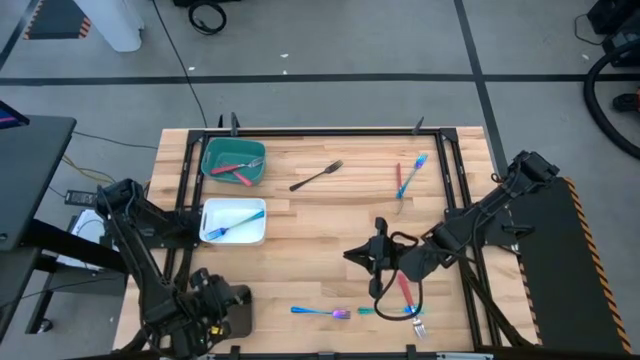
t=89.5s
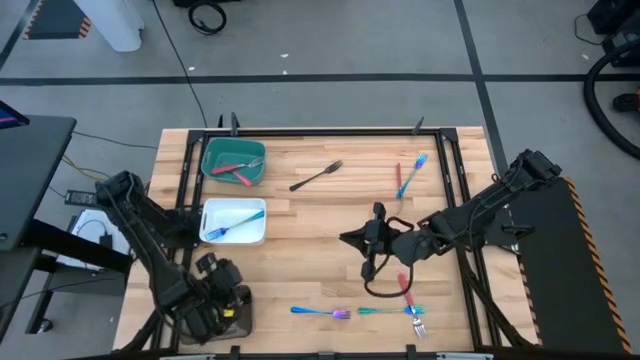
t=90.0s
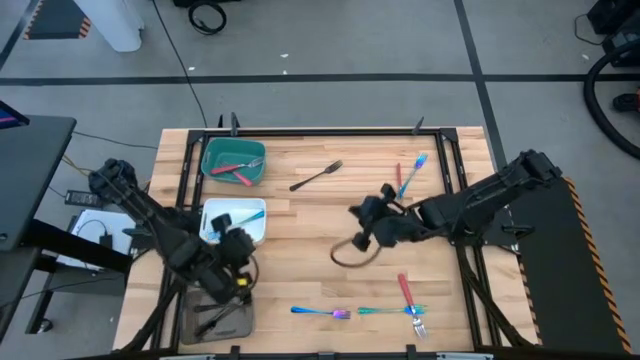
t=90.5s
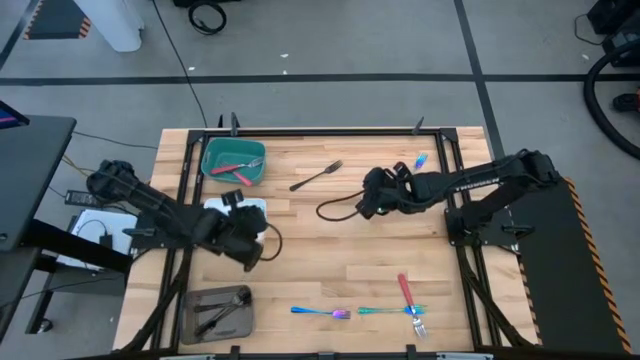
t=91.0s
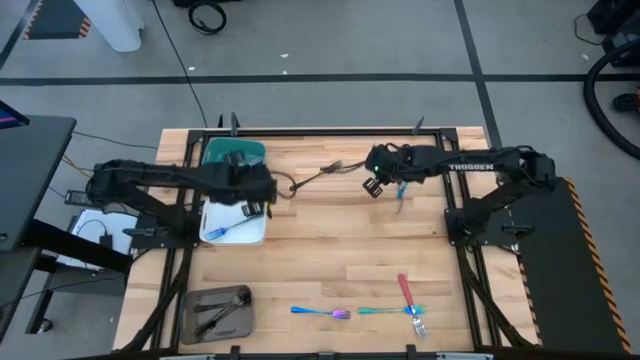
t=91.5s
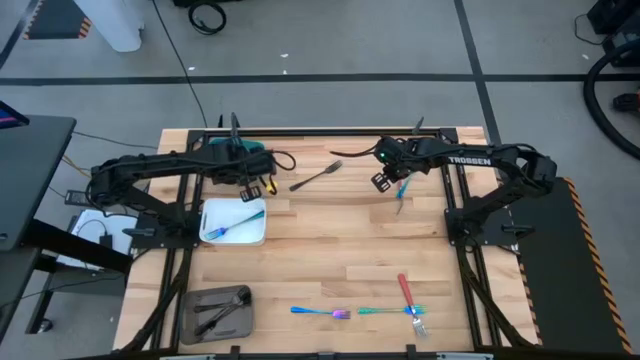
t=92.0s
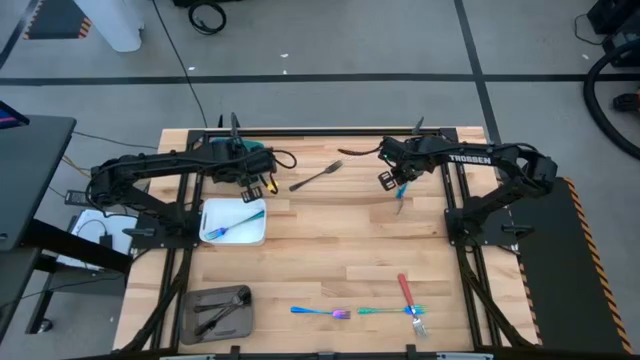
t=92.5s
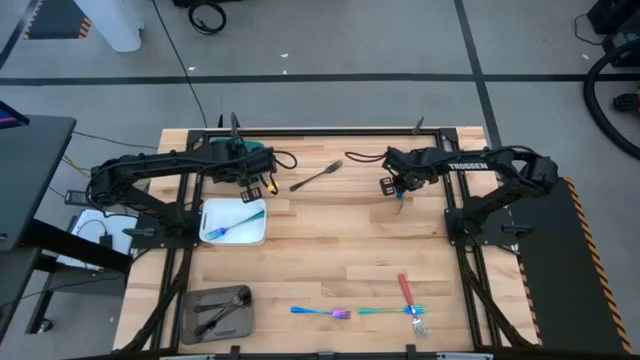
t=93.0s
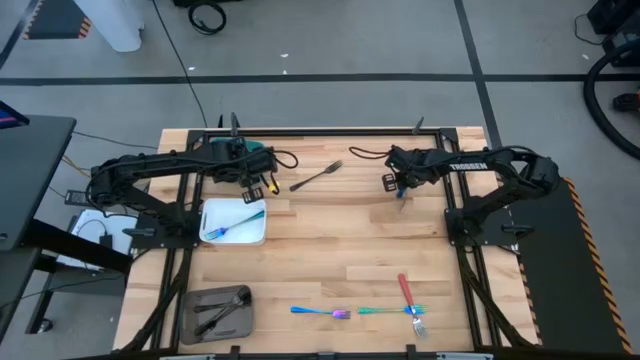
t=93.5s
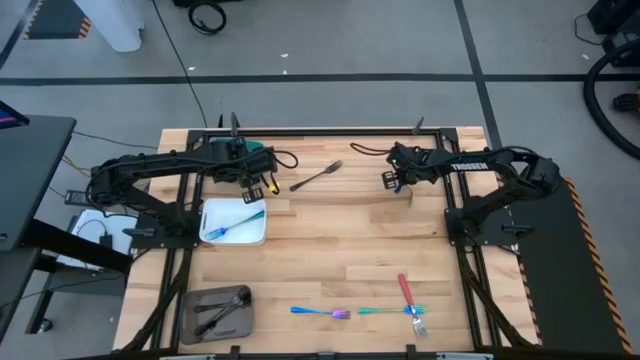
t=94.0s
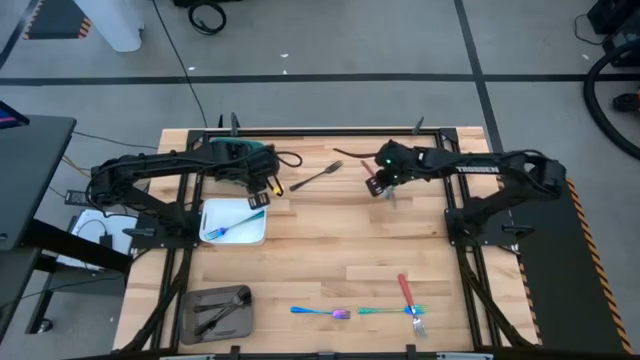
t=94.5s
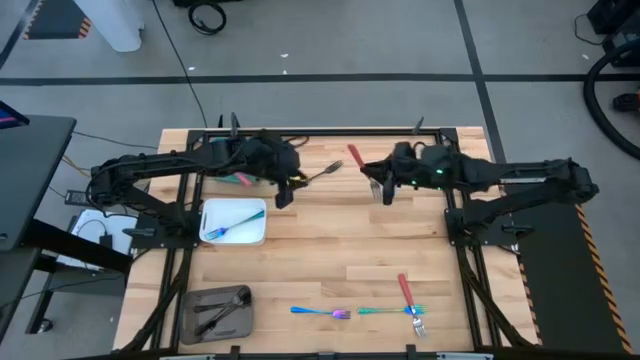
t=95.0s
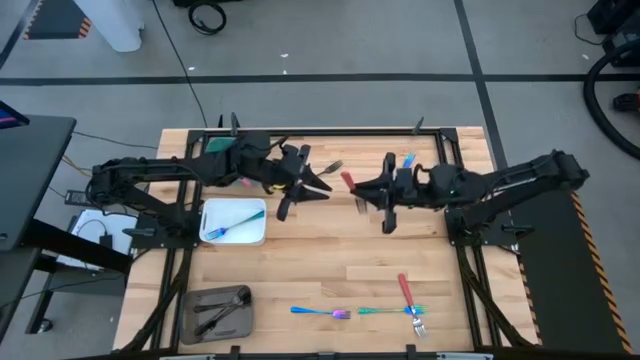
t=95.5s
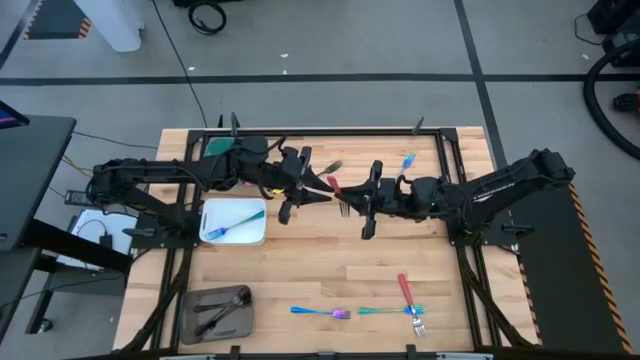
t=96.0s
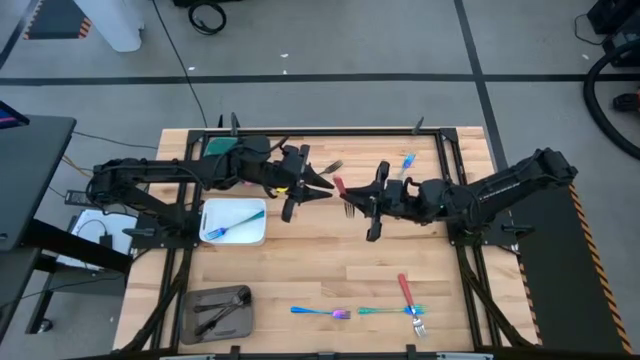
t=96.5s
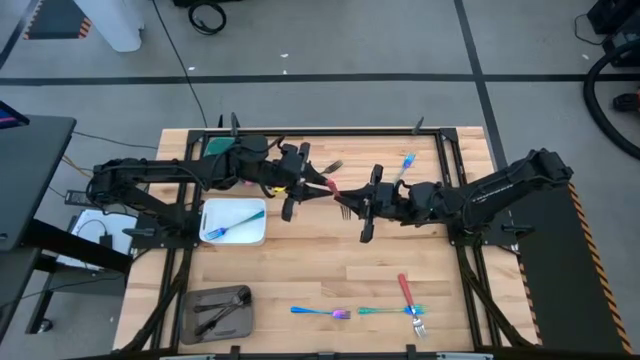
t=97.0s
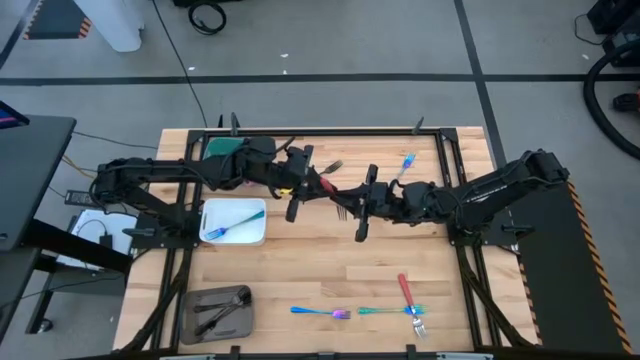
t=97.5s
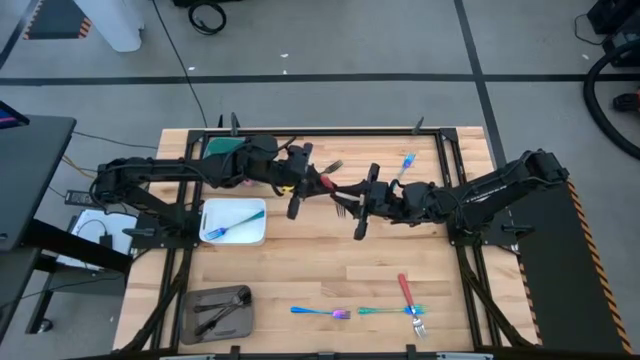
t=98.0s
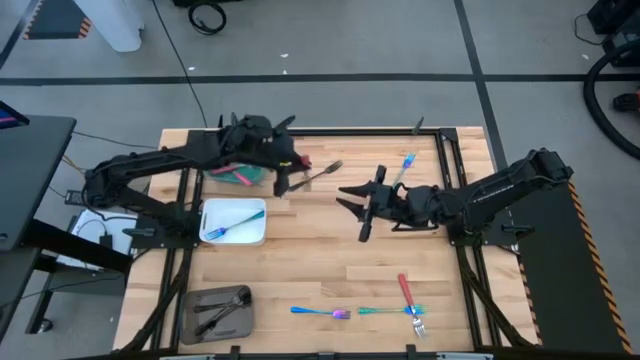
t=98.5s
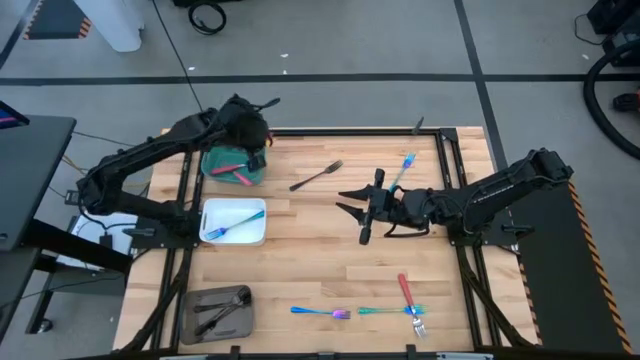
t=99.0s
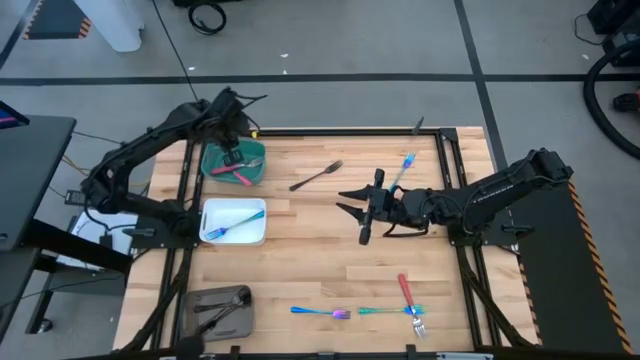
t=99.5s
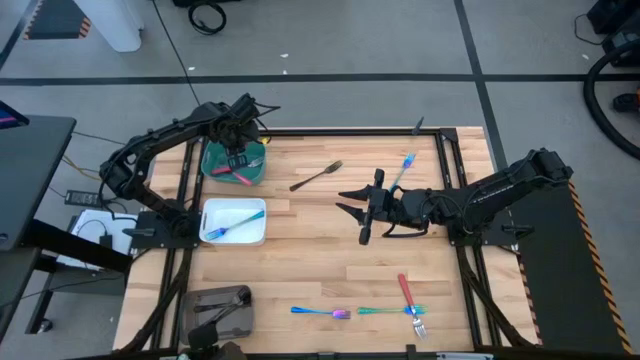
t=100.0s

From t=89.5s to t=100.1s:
Task: Sort silverware by color (type)
Put the pink fork into the green bin

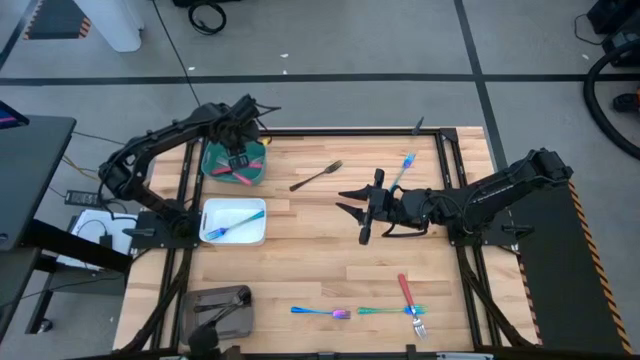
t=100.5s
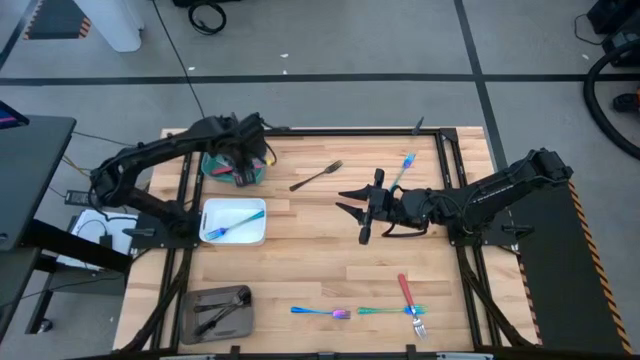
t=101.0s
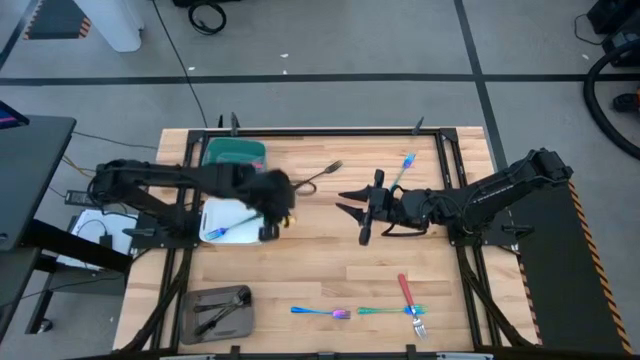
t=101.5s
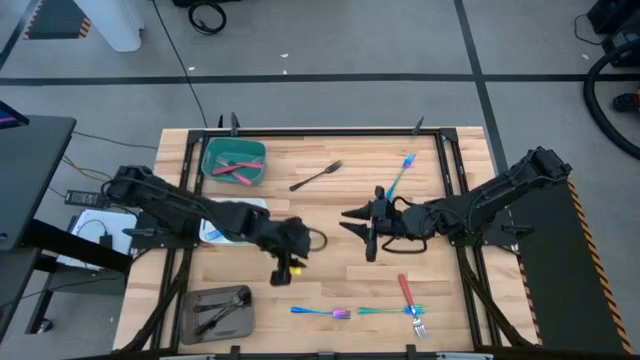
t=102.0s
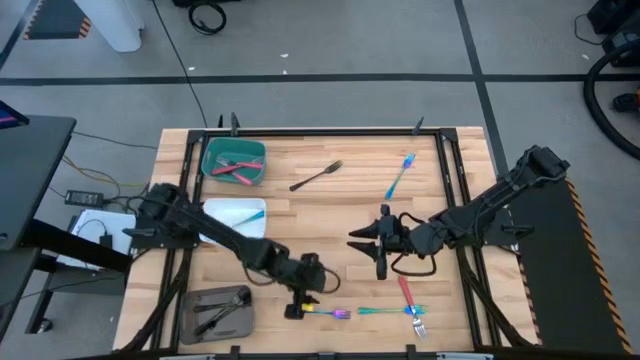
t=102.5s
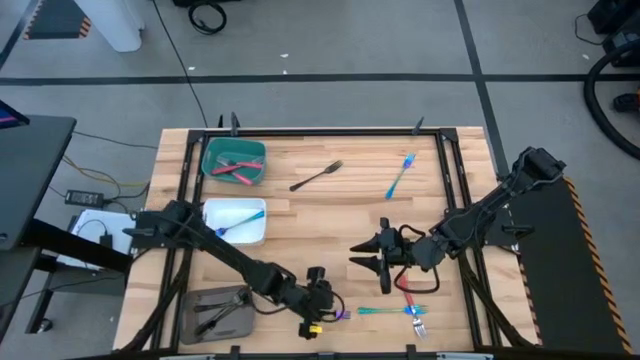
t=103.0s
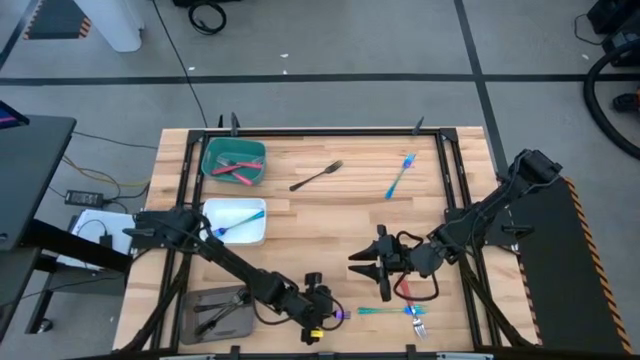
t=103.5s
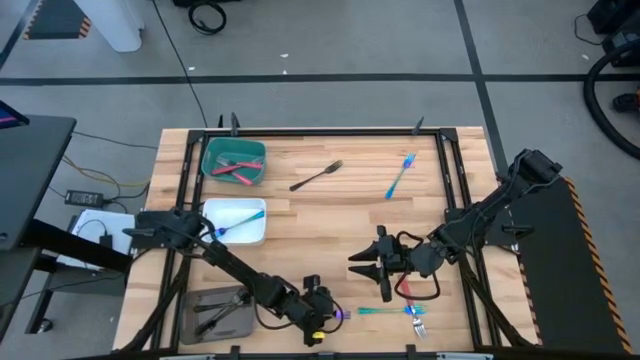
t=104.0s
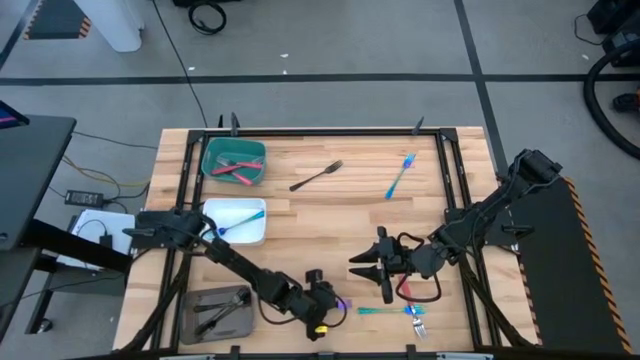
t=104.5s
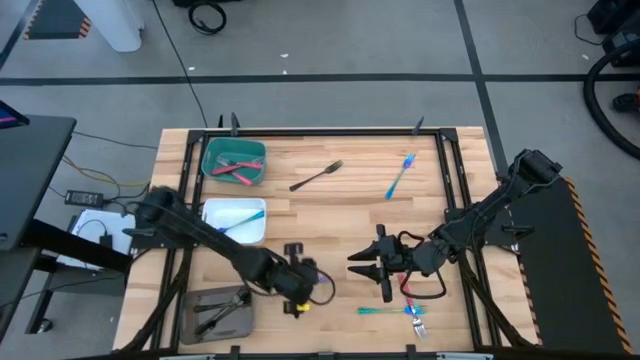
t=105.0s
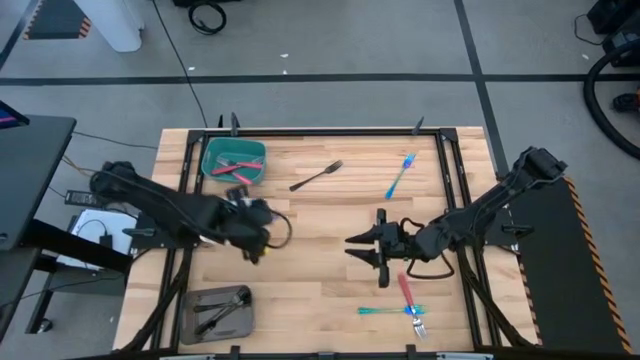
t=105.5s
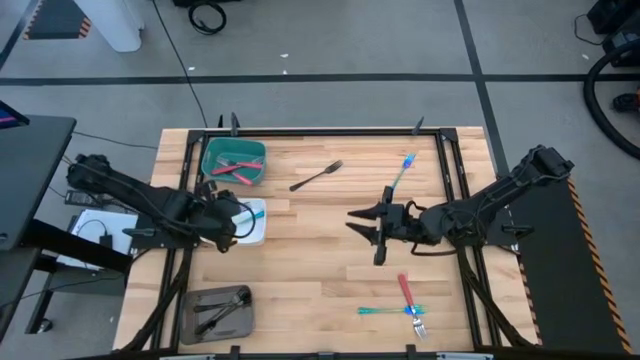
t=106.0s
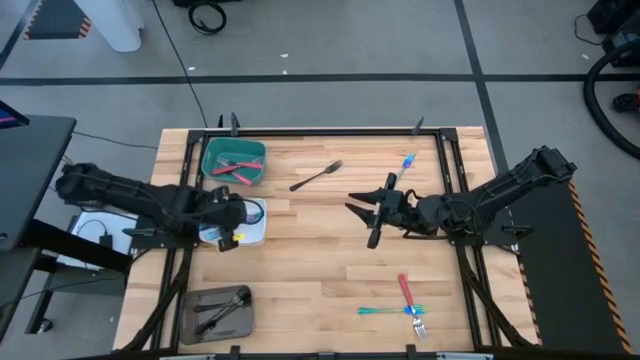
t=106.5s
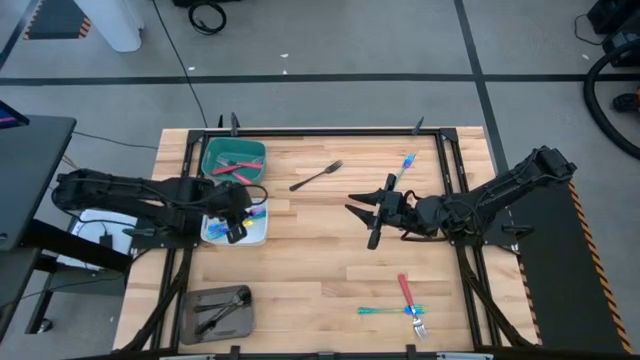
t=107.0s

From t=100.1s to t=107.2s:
Put the blue fork into the white bin

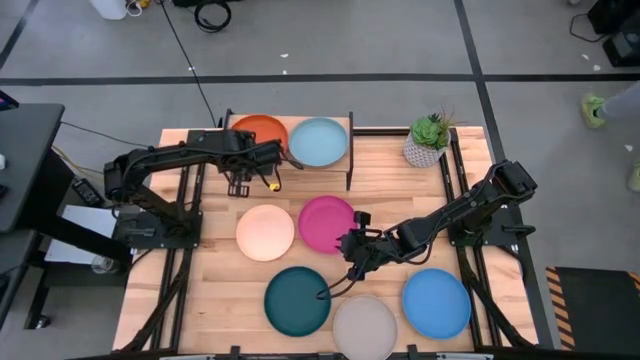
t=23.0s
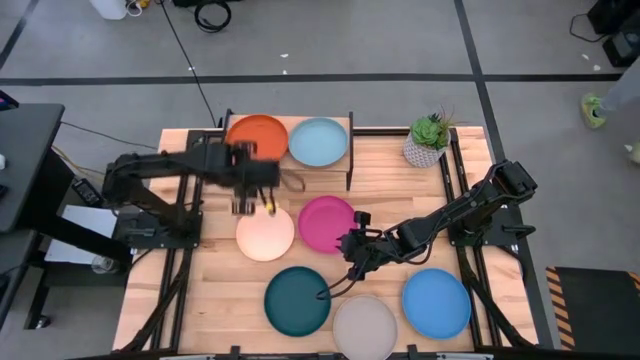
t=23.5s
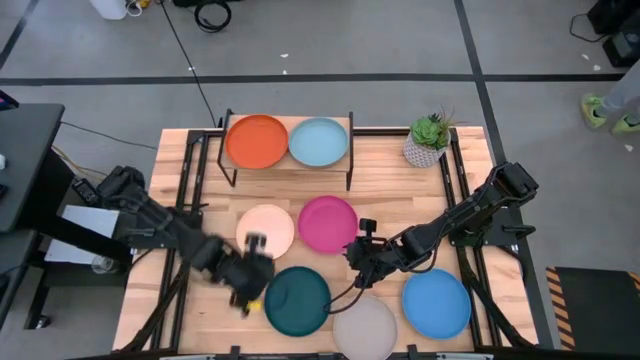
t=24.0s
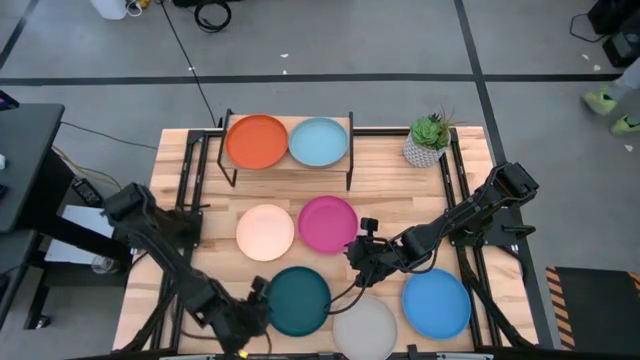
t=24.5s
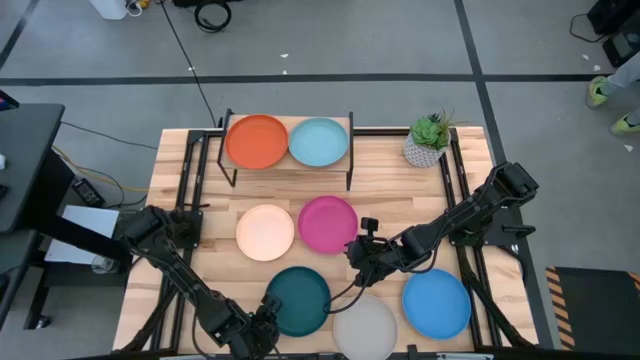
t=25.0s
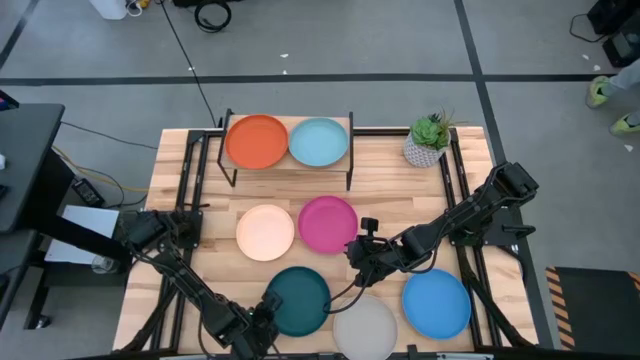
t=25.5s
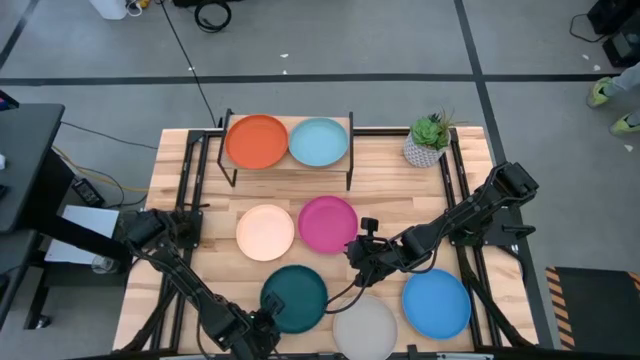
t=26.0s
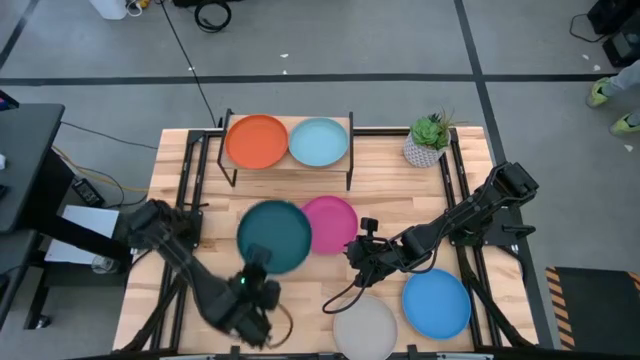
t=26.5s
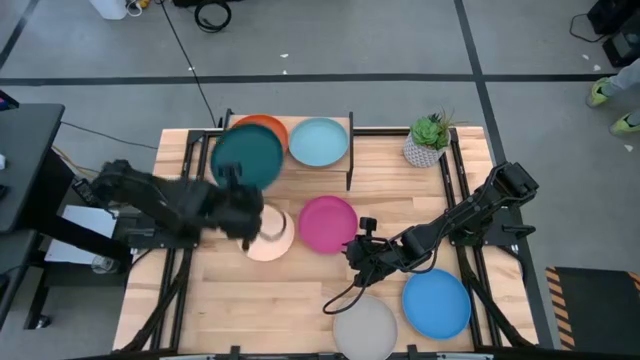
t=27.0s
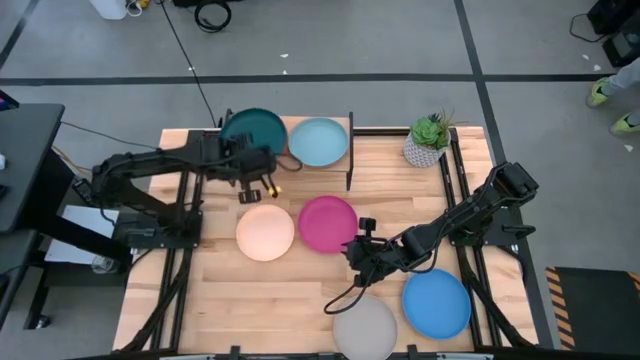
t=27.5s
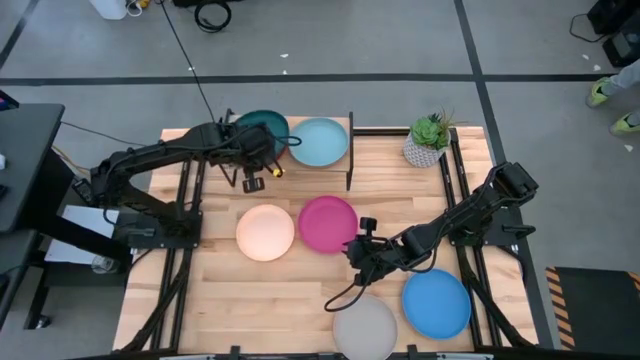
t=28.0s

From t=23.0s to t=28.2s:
Task: Place and stack plates onto a shelf
Stack the dark blue plate on top of the orange plate on the shelf
